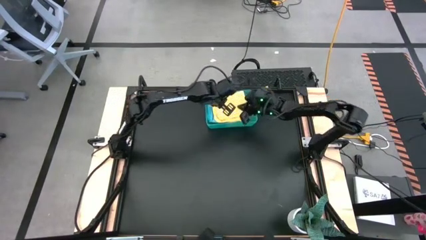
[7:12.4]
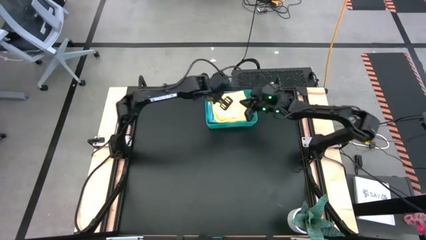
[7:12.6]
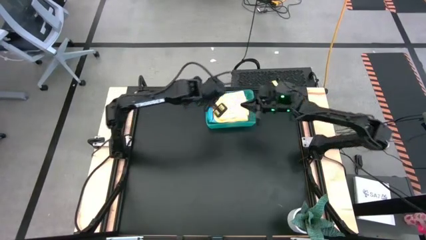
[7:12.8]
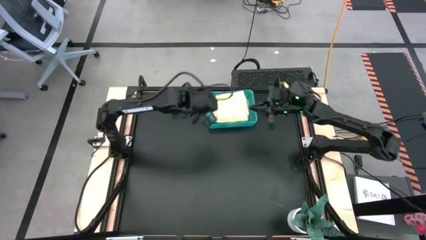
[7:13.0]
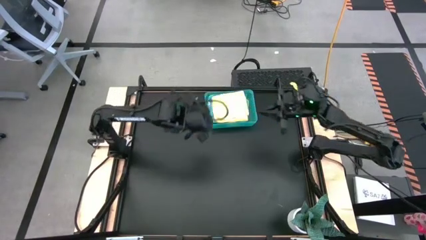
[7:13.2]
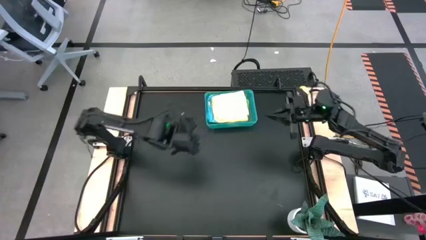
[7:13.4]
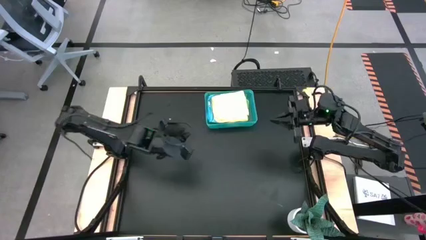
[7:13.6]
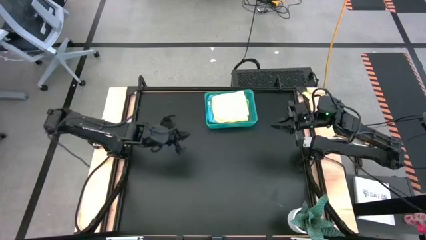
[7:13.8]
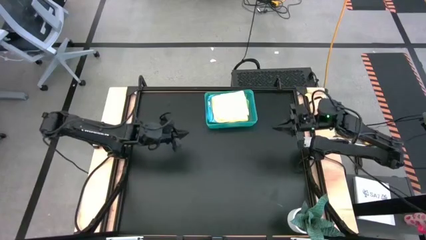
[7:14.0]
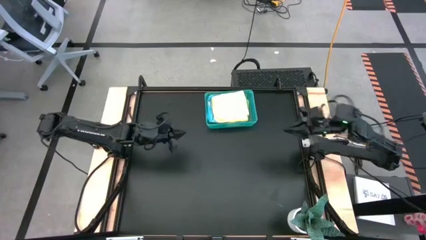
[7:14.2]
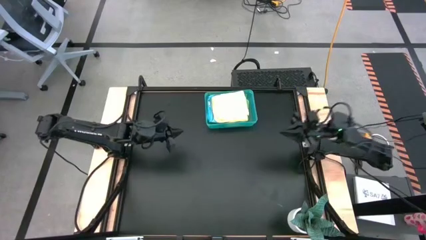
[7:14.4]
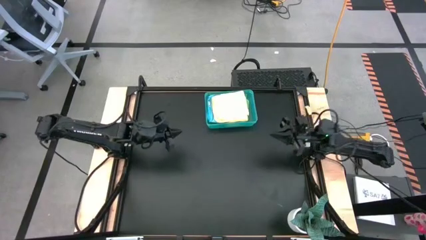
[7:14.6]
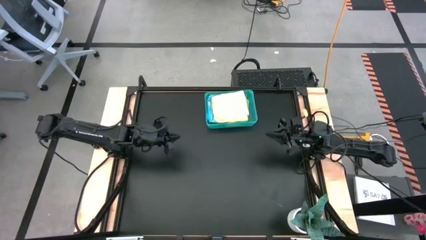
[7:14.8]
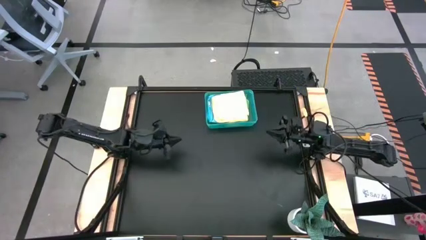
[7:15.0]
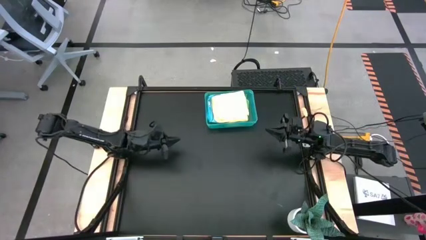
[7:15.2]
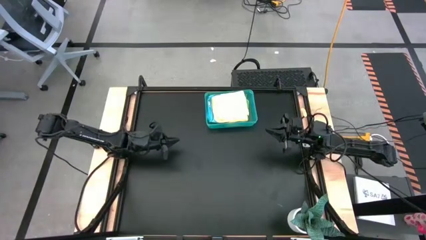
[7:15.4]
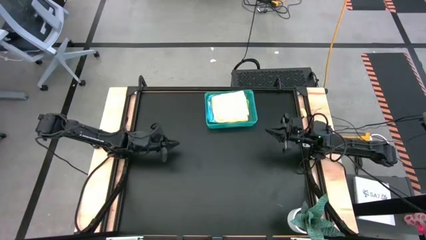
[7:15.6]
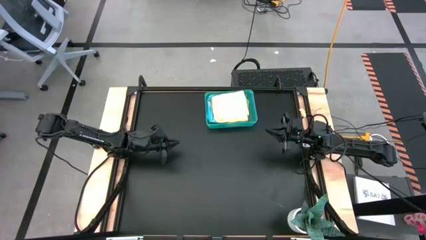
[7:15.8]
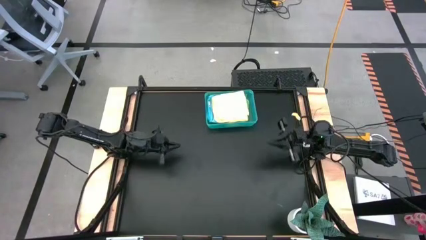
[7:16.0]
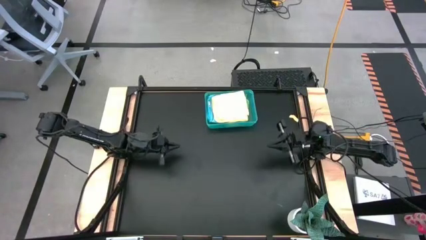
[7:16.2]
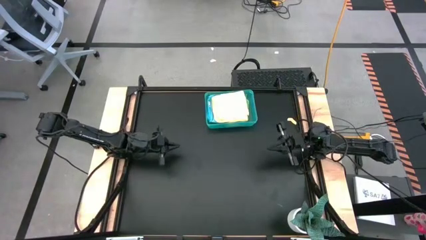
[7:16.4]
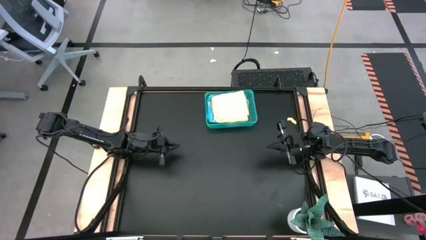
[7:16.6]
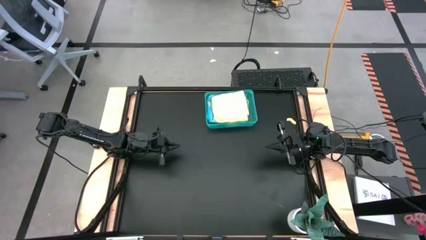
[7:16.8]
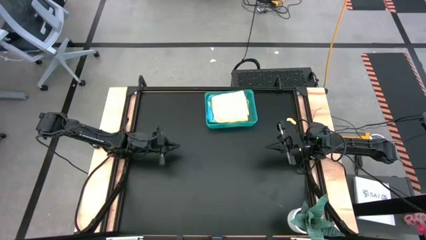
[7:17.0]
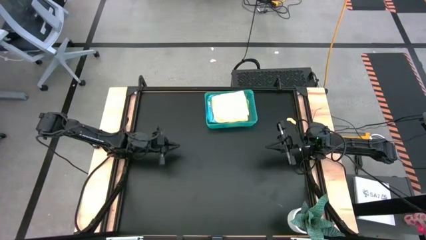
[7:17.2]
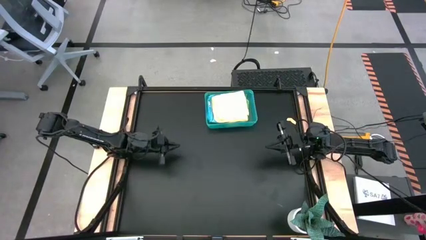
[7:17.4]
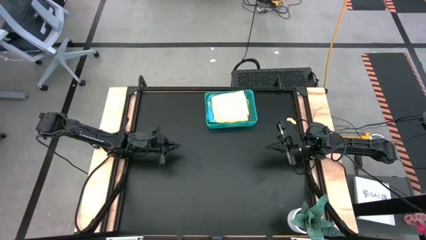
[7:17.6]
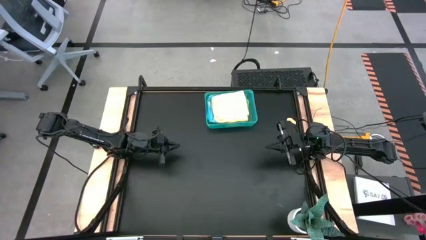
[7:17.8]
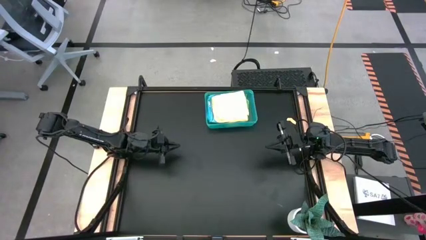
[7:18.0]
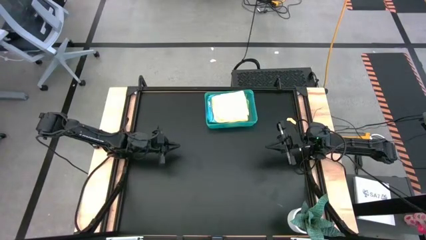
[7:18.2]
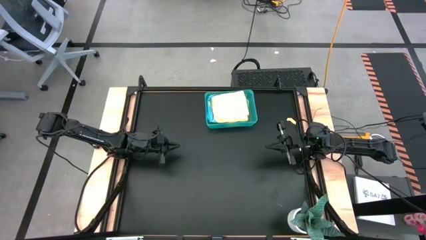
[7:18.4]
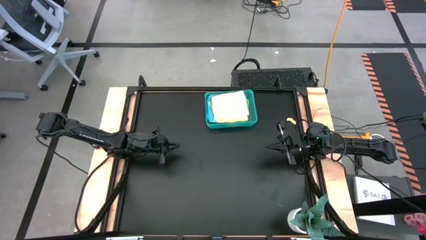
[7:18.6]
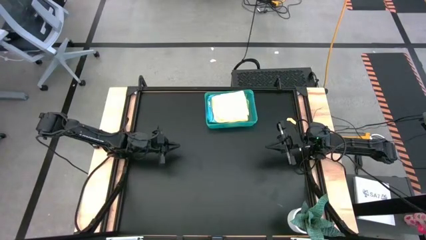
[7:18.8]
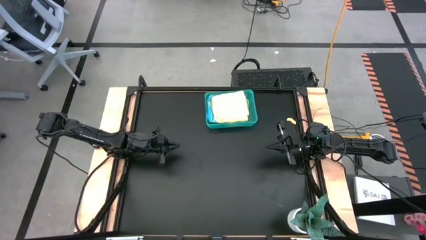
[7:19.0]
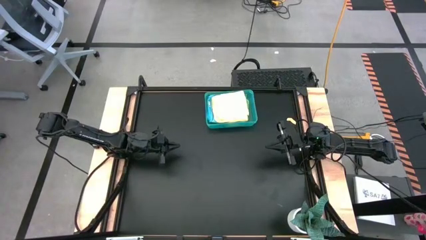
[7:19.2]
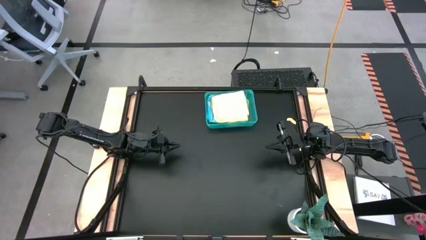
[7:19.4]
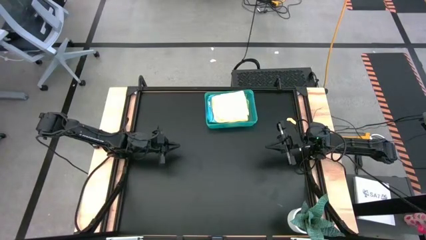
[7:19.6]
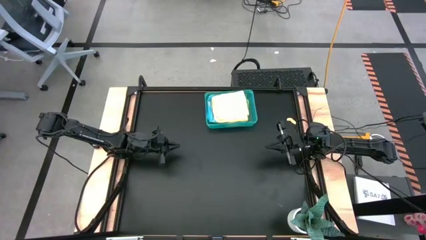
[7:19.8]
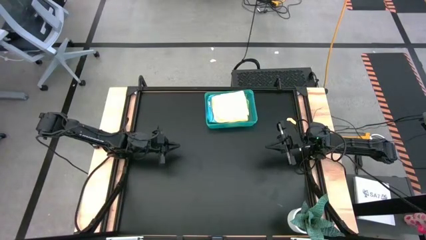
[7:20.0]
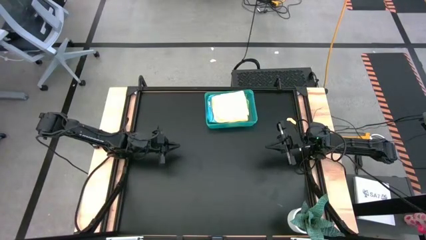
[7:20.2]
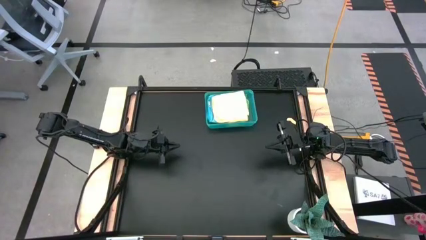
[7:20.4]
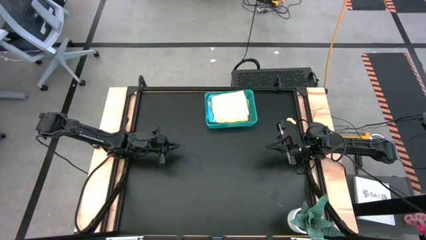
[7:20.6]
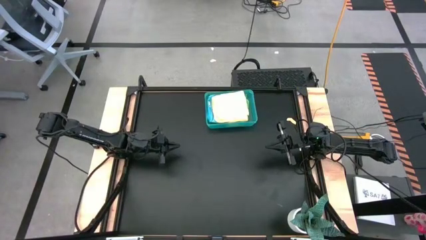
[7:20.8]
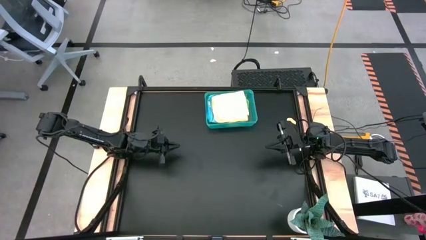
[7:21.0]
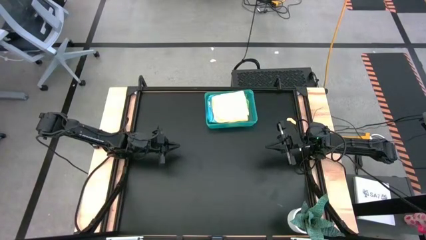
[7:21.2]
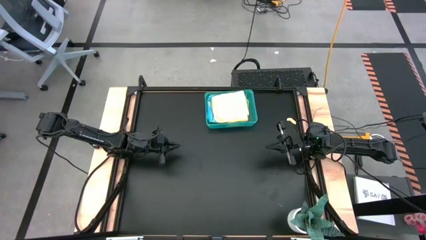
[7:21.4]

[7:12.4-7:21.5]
Task: Fold microfiber towels
Return to Home Position
